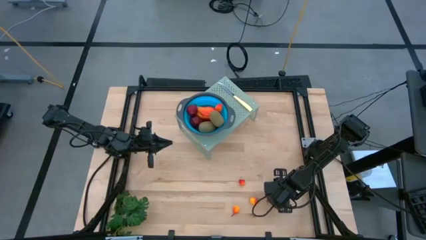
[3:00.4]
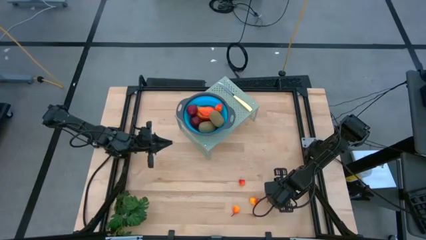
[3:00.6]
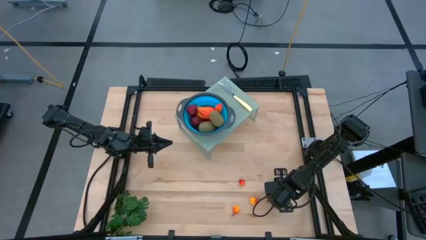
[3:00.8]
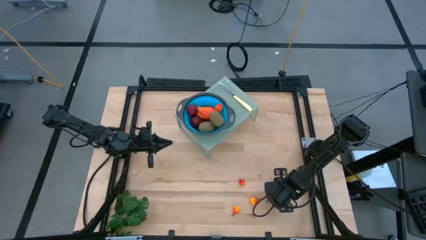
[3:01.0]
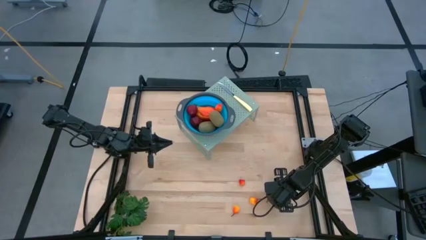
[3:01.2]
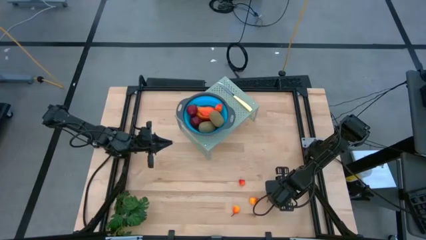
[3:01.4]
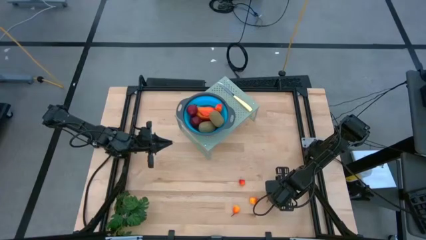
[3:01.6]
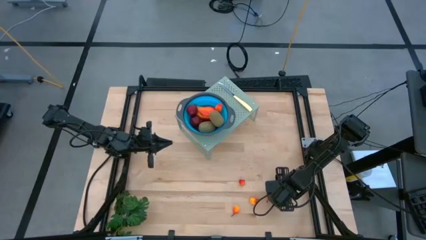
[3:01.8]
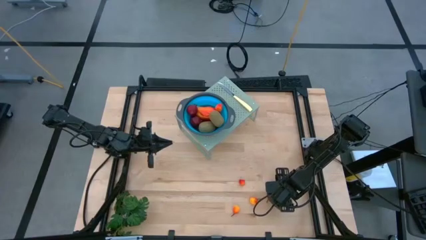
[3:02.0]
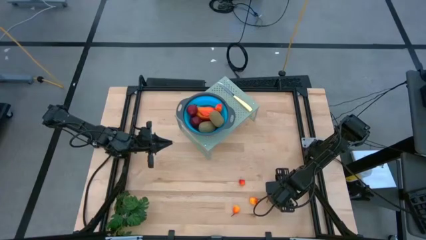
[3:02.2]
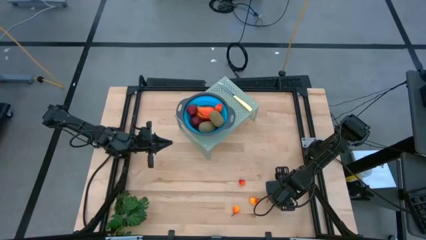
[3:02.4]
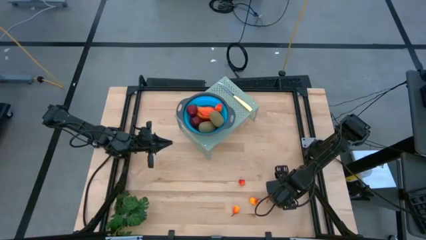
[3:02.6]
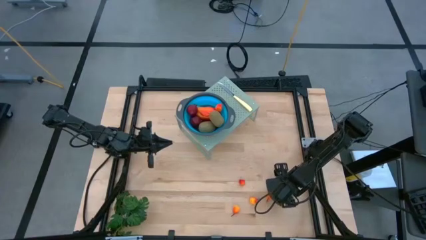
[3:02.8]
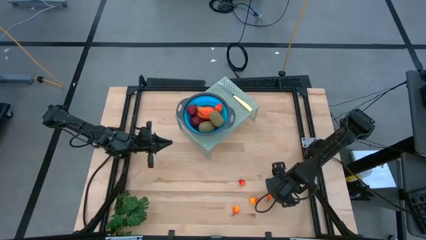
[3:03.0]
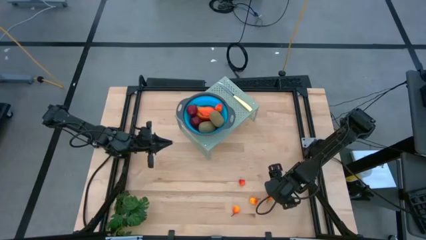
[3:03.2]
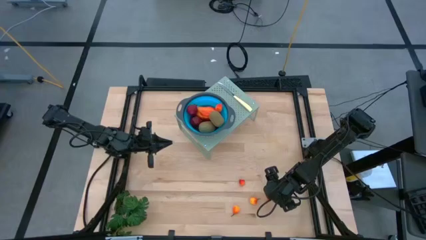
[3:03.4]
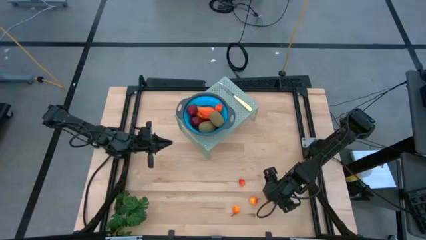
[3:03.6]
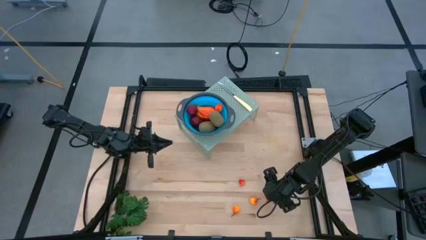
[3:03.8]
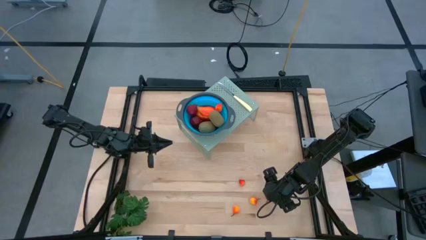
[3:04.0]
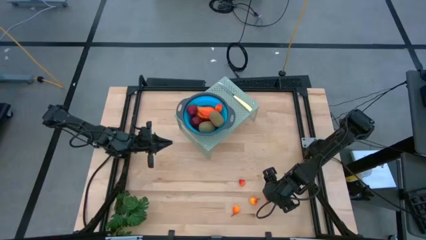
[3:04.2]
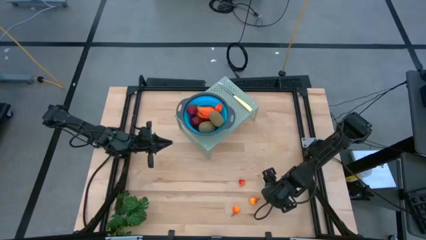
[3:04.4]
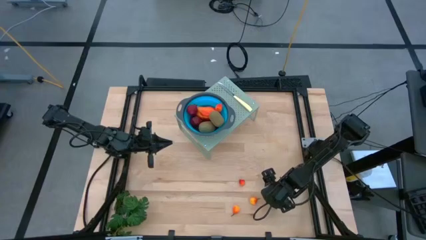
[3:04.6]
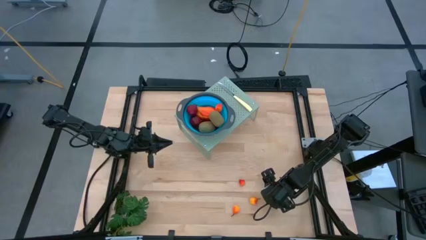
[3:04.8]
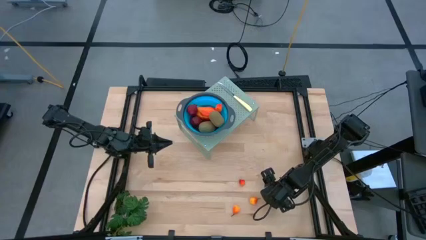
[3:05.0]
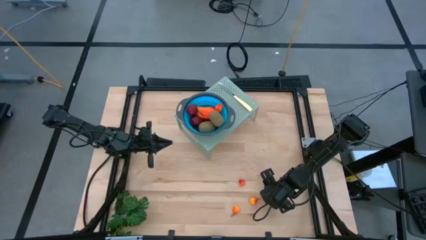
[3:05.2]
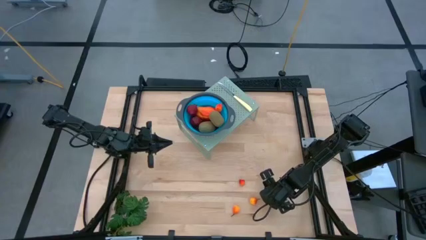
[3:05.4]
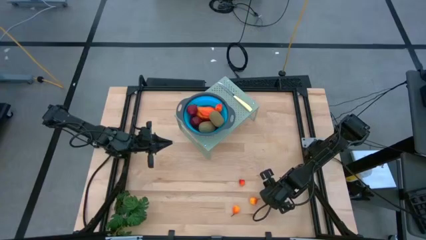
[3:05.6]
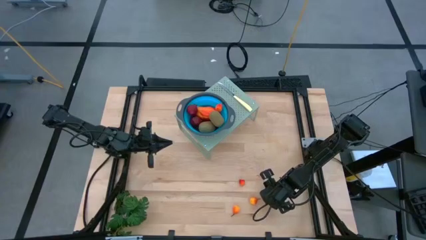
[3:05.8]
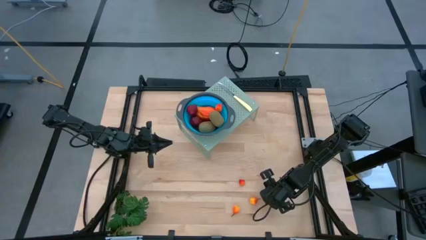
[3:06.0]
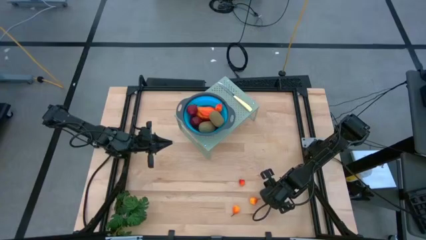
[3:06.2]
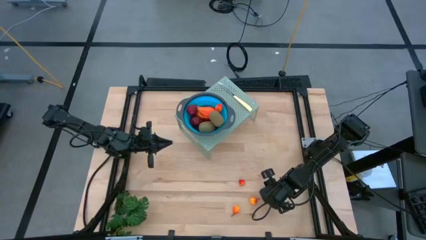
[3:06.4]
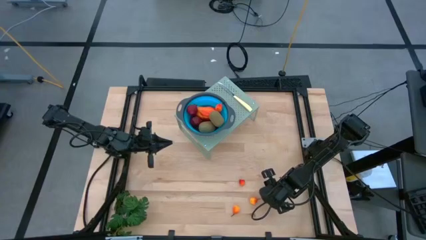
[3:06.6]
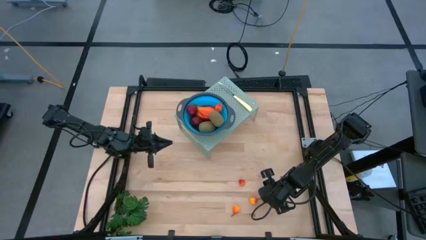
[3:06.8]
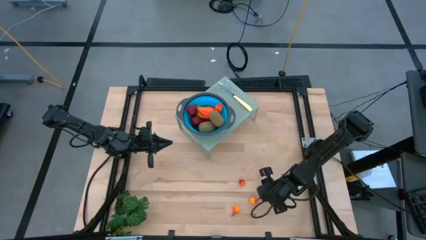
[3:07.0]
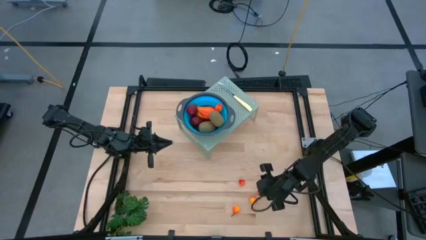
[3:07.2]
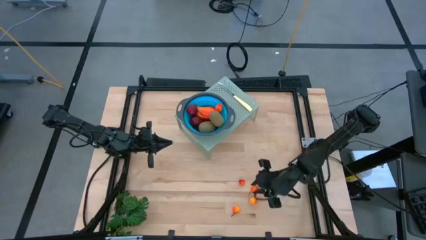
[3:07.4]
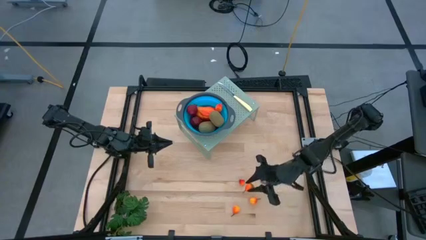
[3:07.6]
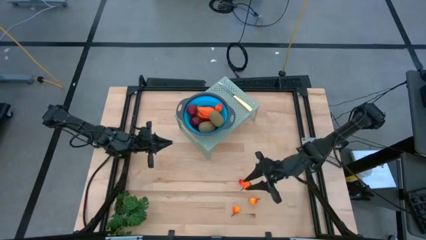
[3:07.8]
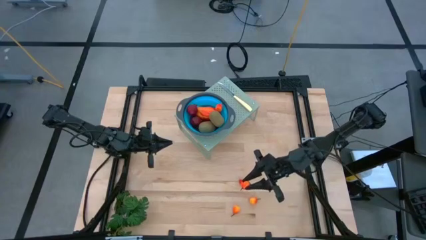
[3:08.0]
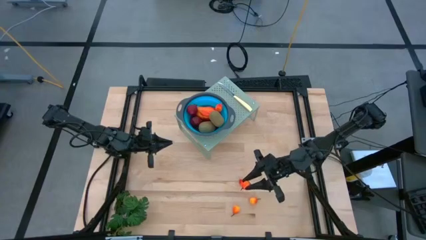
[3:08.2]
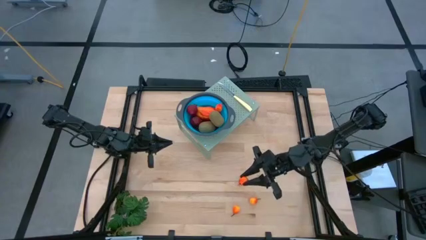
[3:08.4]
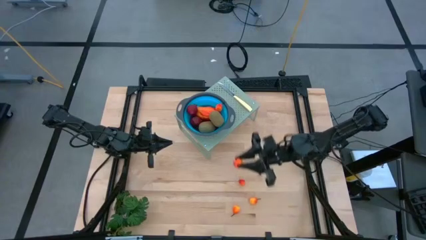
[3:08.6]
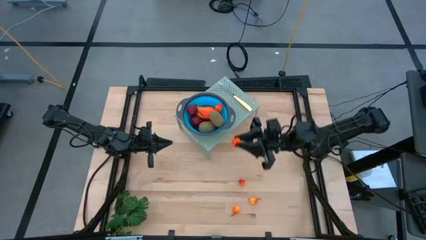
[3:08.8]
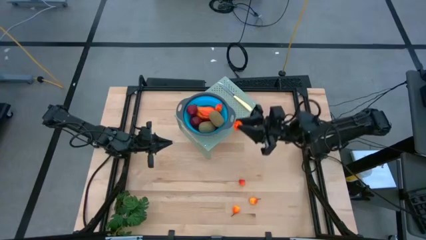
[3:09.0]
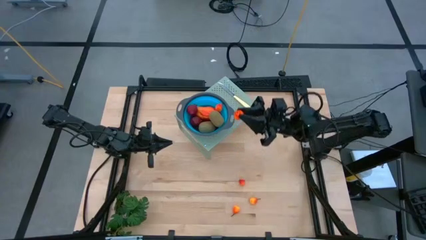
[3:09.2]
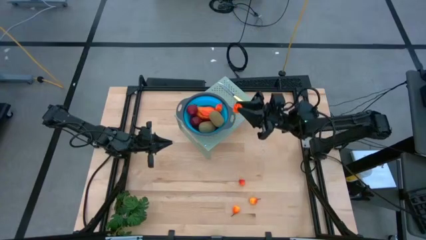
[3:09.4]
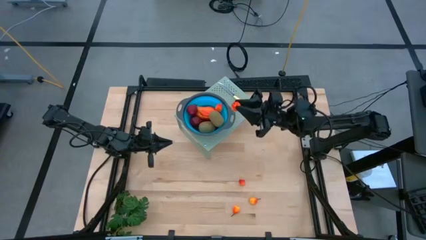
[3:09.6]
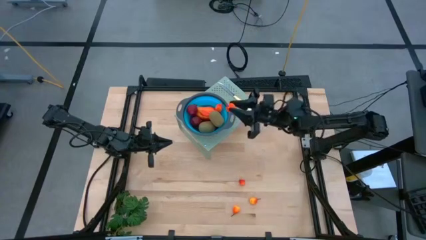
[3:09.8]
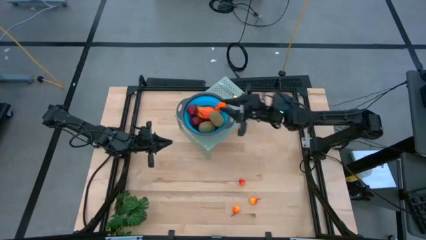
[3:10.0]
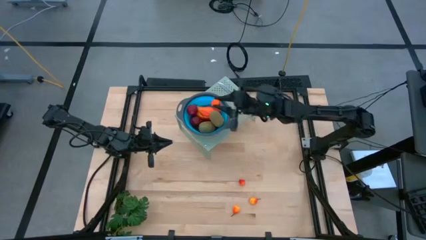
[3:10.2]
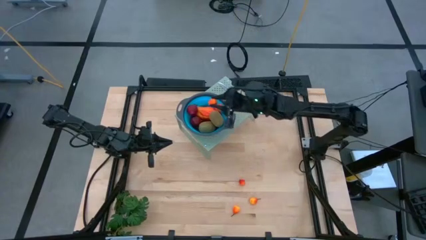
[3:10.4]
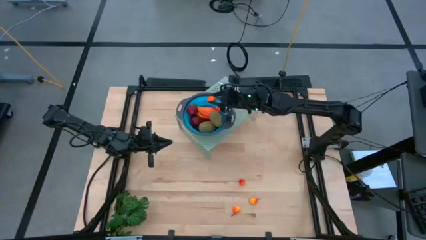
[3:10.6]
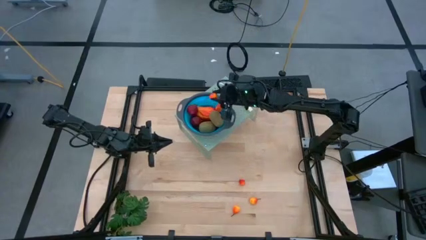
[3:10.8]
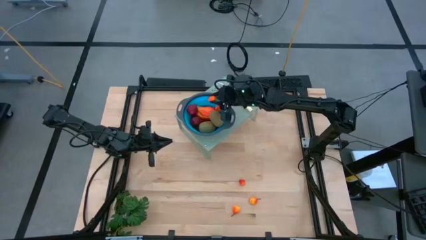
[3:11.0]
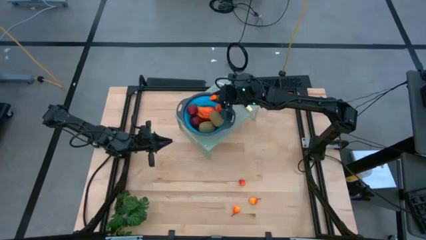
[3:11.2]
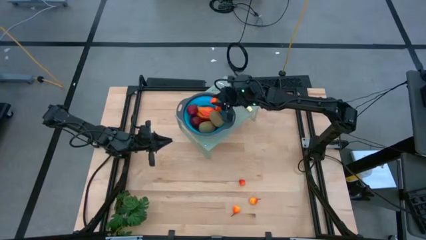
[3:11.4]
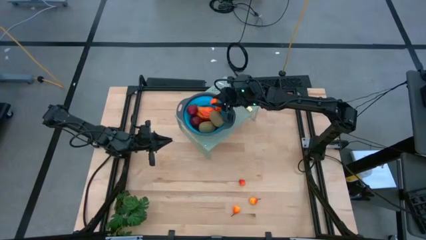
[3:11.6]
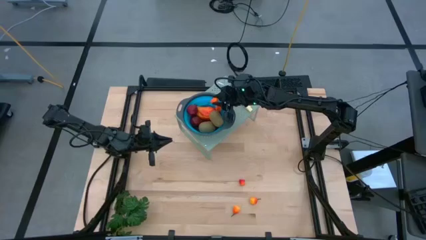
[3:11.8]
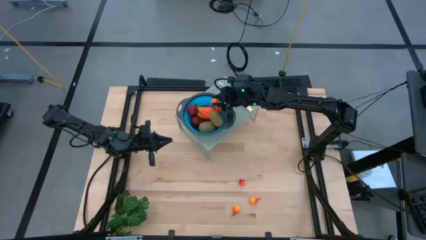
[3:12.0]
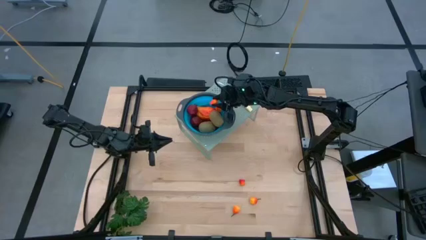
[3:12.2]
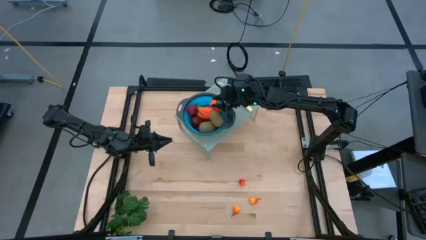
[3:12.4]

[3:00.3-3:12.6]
Task: Pick & Place Fruit
Put the peach into the collapsible colander on the shelf
